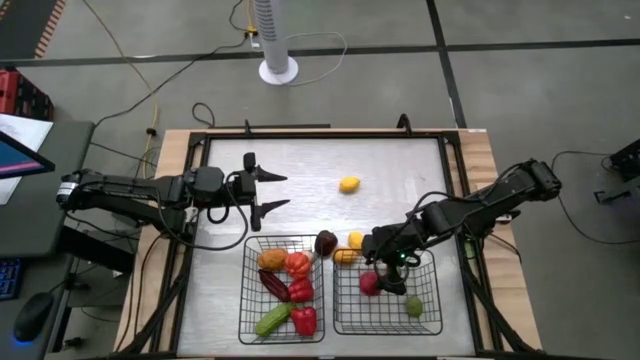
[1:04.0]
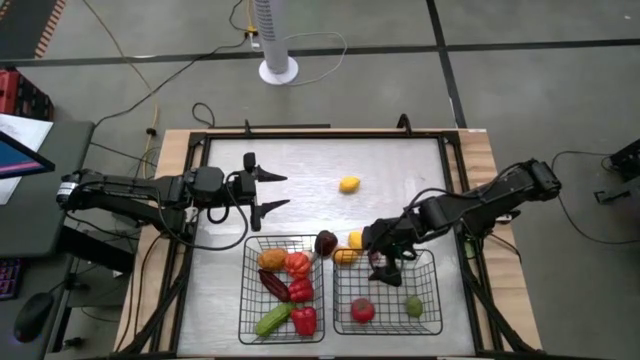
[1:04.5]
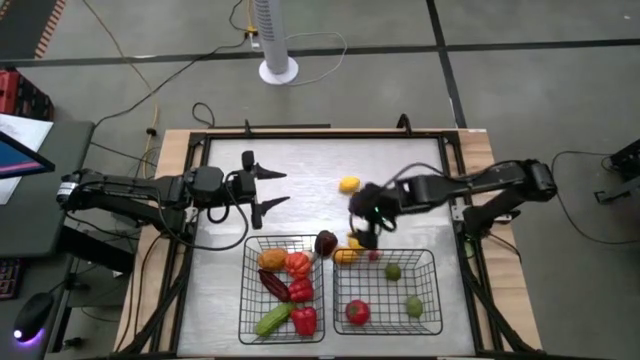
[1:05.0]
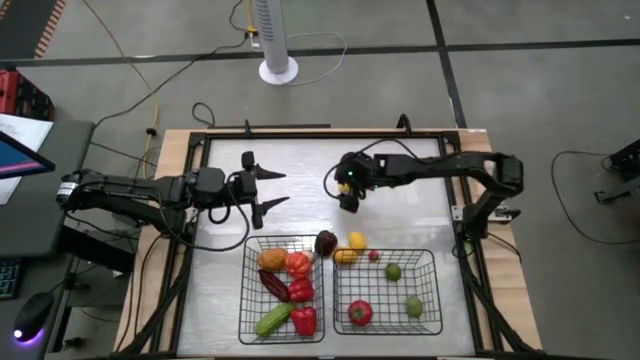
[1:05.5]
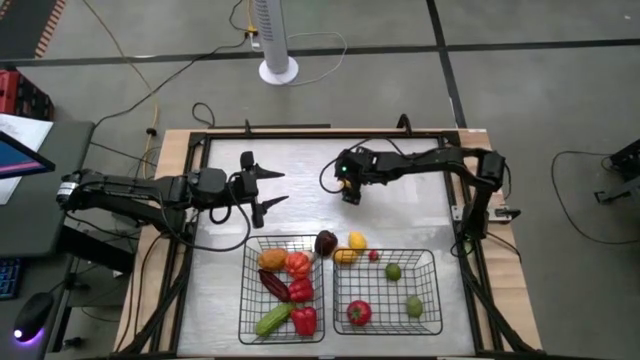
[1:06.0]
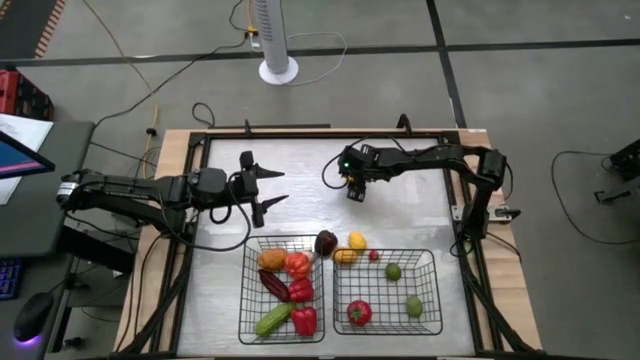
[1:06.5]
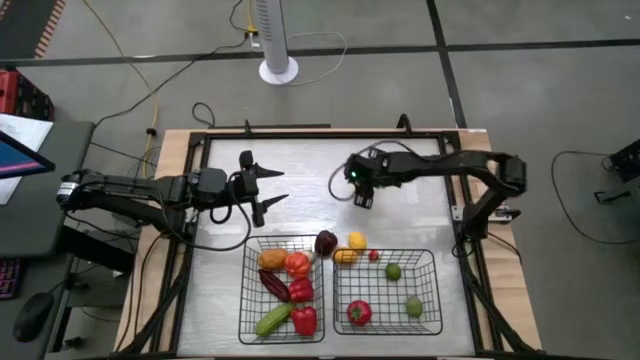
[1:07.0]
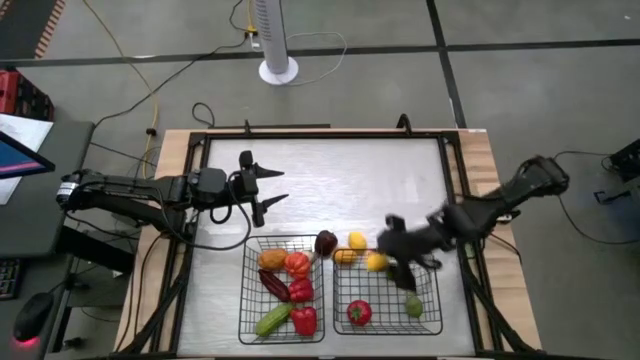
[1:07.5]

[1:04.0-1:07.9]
Task: Sort produce into baskets
Put the top yellow lemon into the right black wire basket

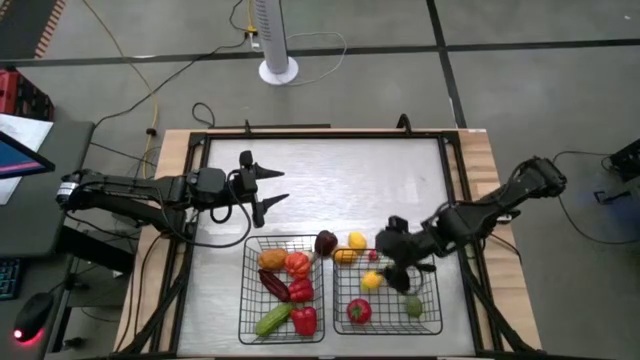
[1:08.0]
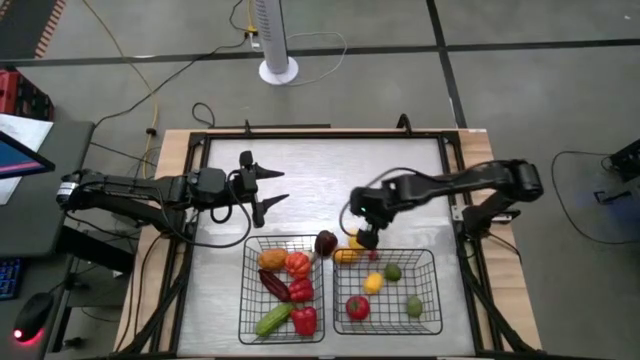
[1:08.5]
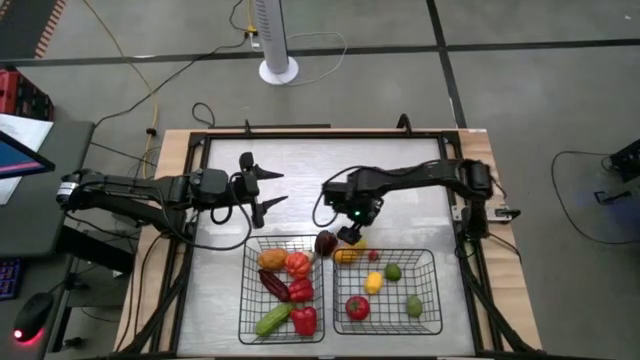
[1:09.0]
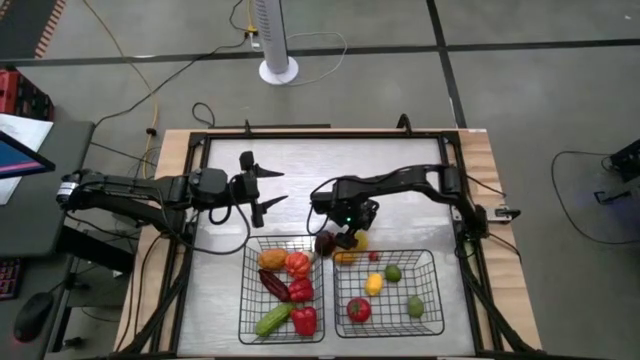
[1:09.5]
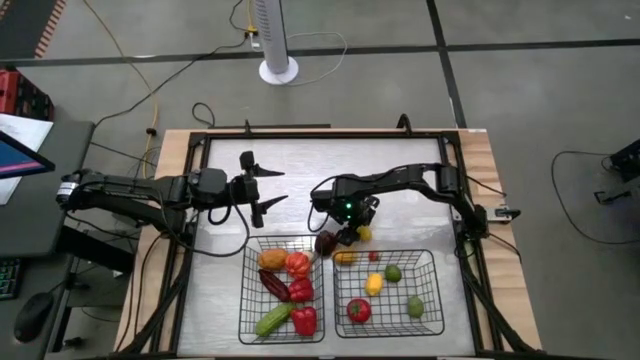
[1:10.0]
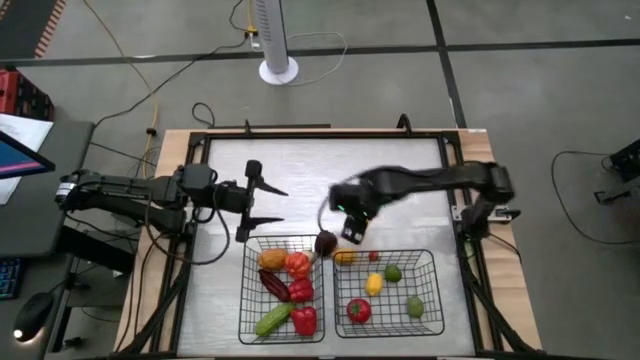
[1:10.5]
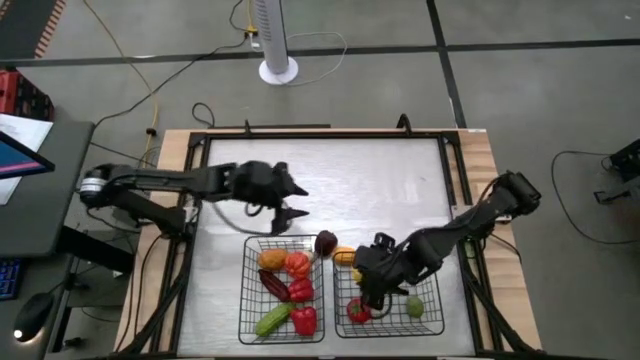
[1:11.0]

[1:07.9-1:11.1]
Put the top yellow lemon into the right black wire basket

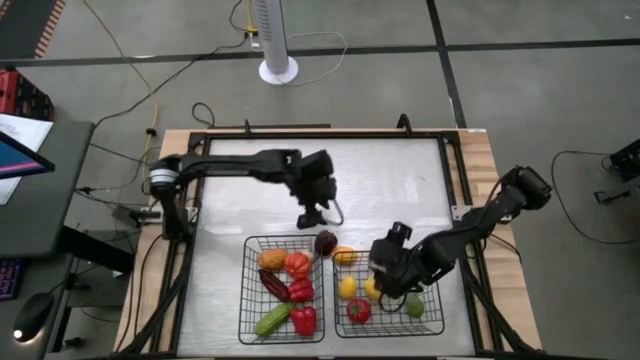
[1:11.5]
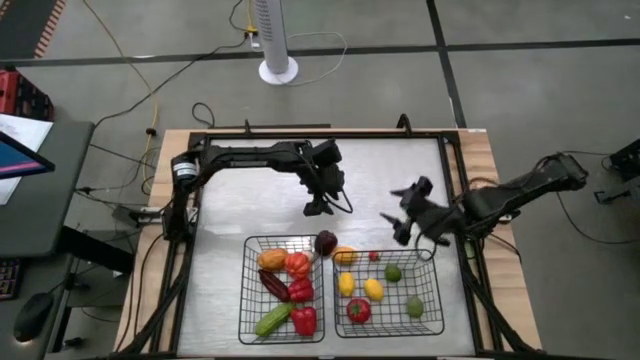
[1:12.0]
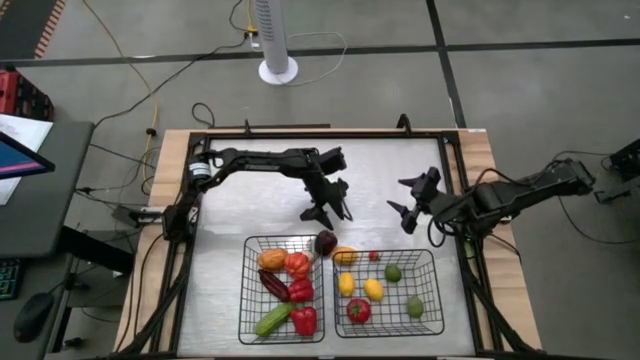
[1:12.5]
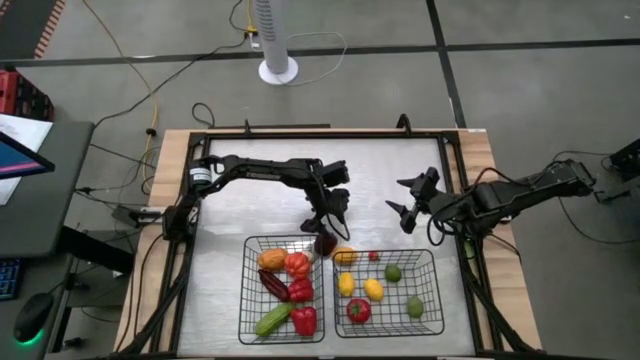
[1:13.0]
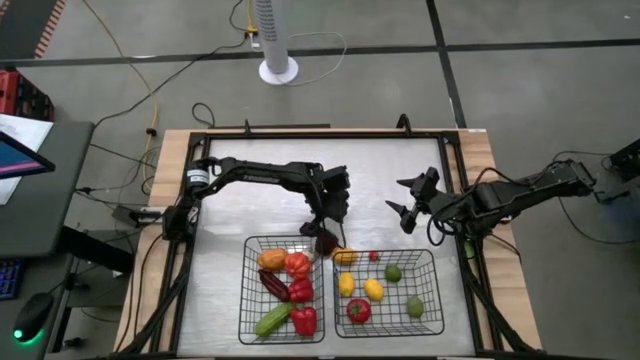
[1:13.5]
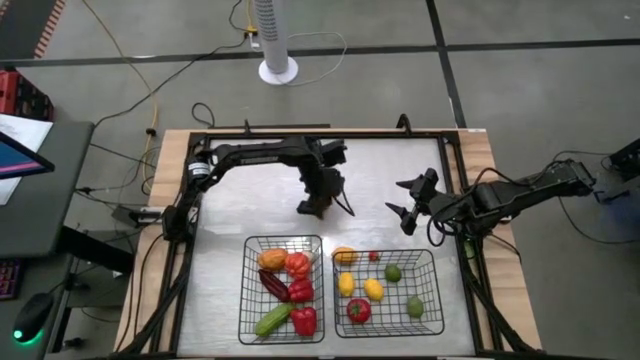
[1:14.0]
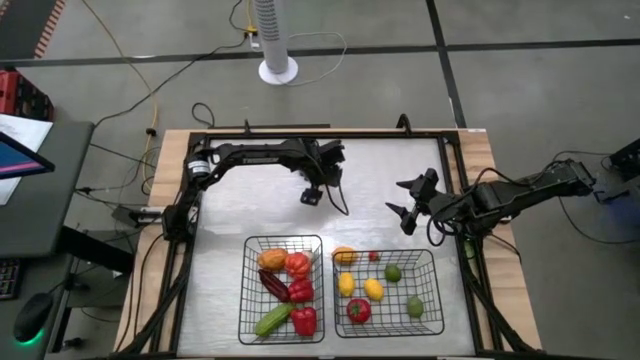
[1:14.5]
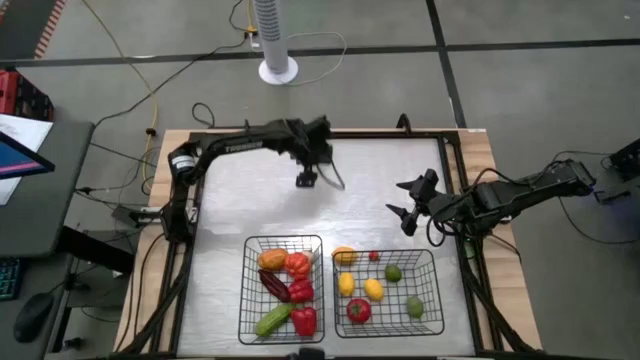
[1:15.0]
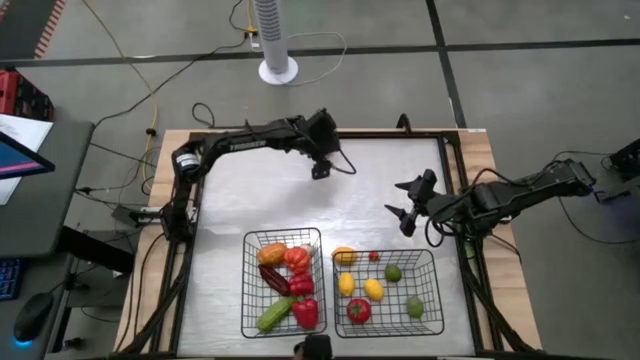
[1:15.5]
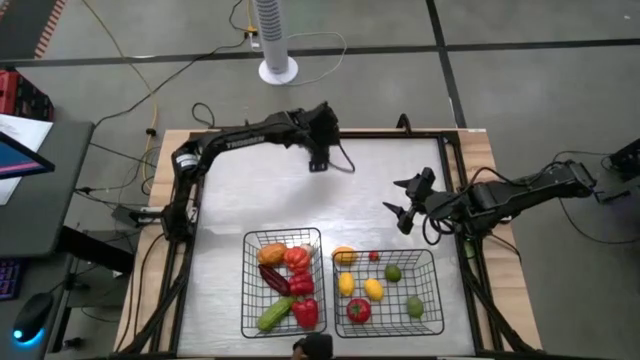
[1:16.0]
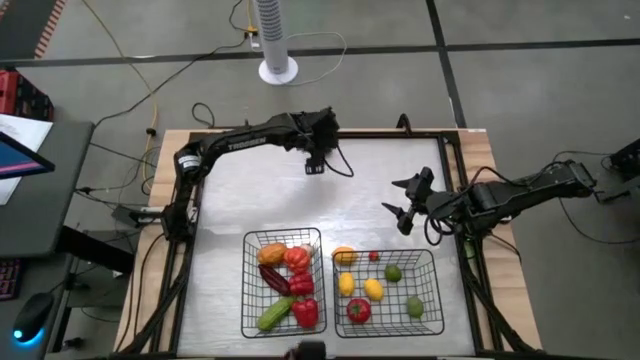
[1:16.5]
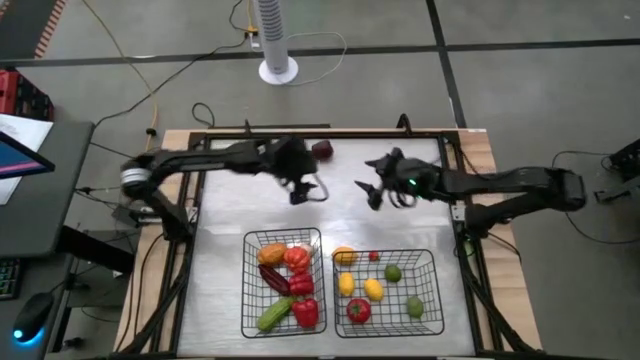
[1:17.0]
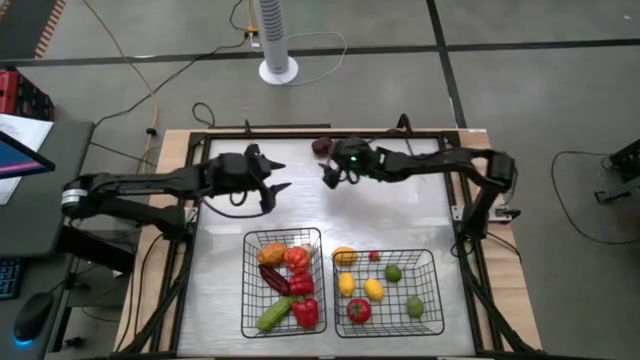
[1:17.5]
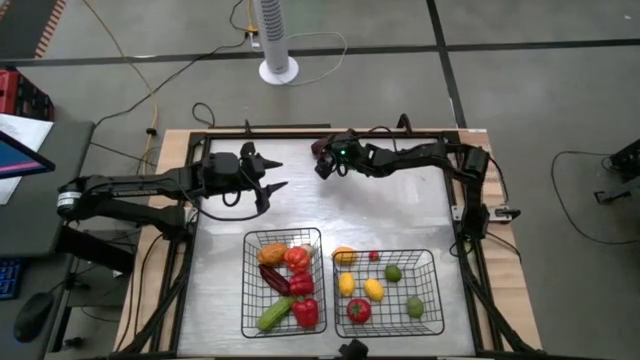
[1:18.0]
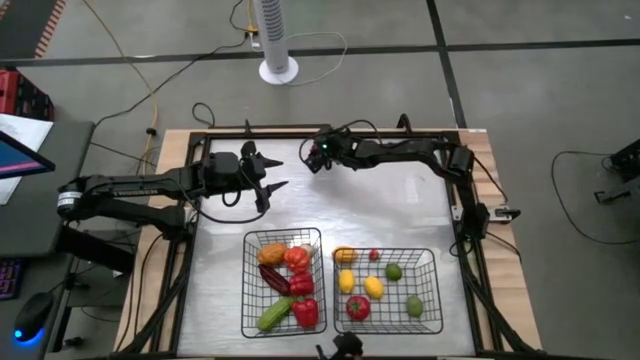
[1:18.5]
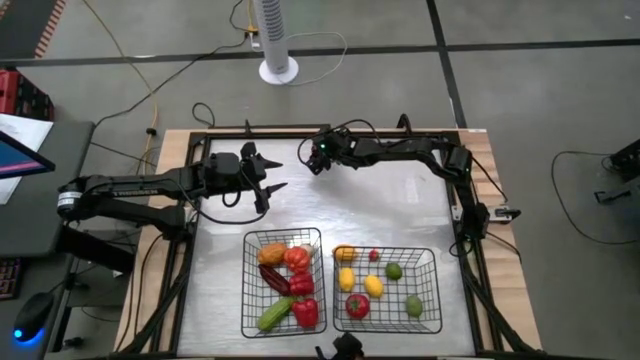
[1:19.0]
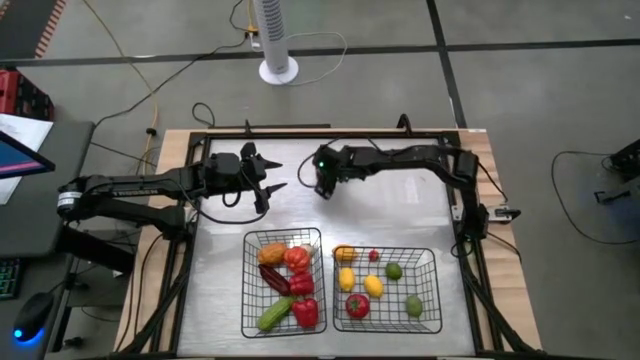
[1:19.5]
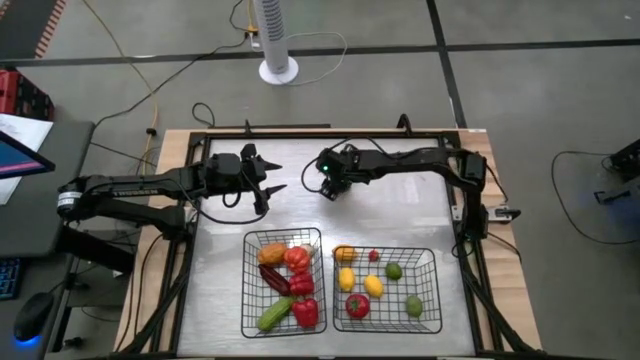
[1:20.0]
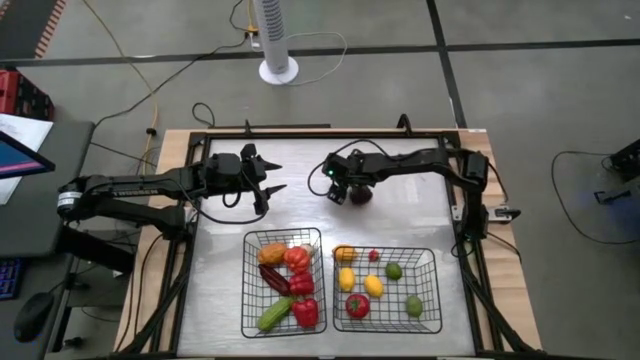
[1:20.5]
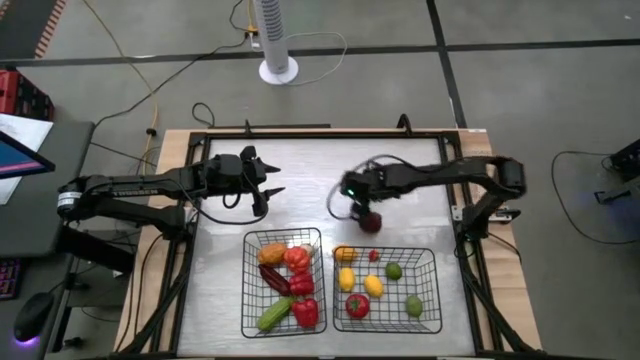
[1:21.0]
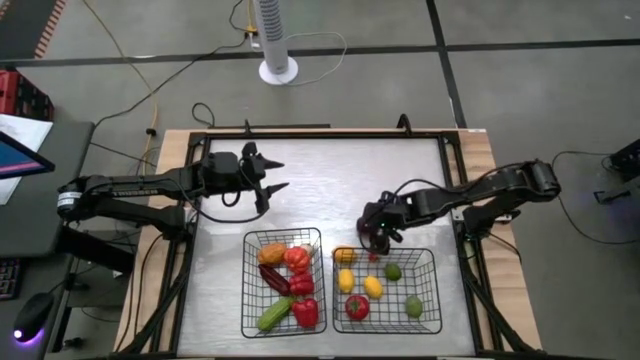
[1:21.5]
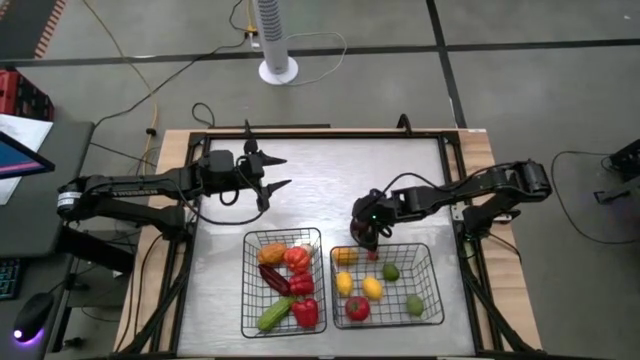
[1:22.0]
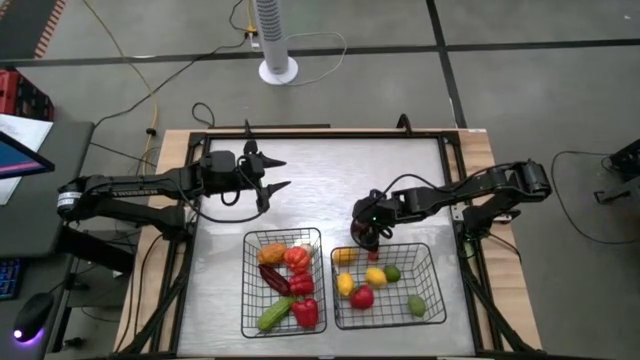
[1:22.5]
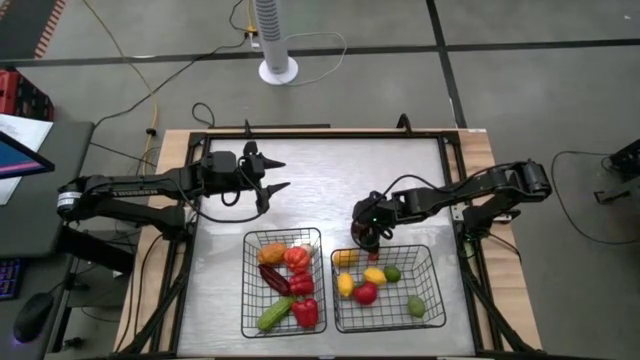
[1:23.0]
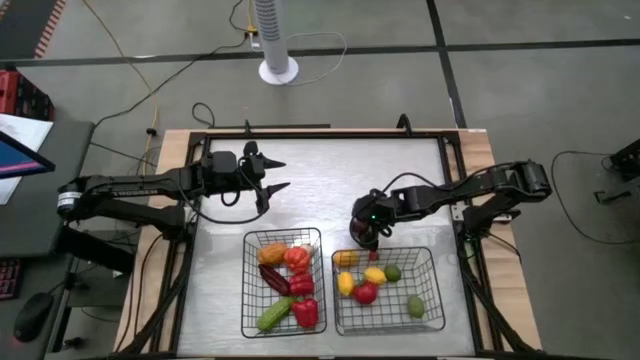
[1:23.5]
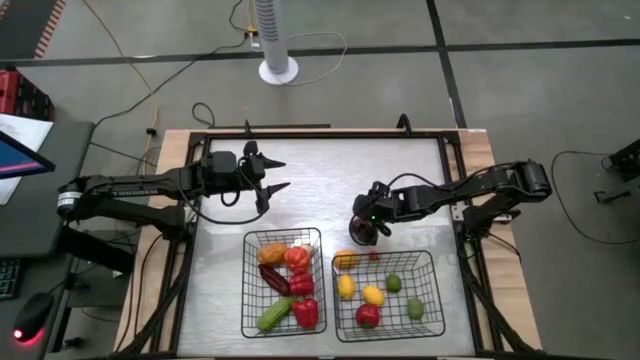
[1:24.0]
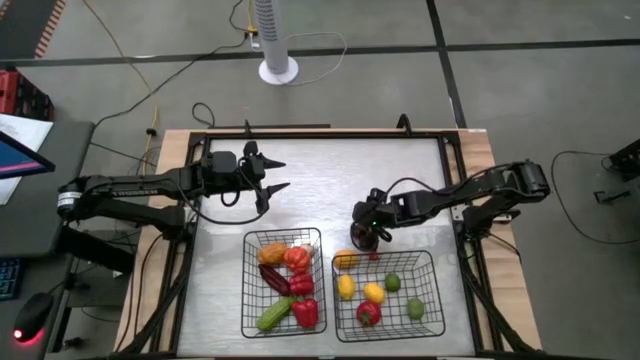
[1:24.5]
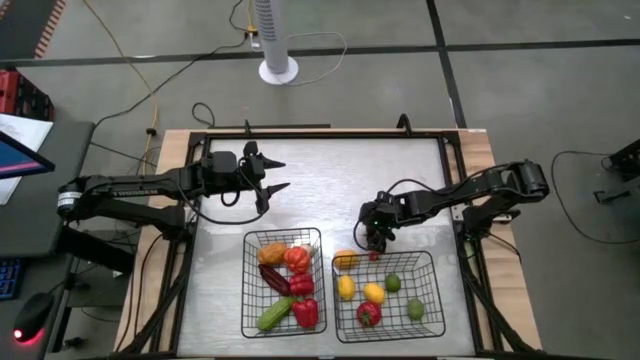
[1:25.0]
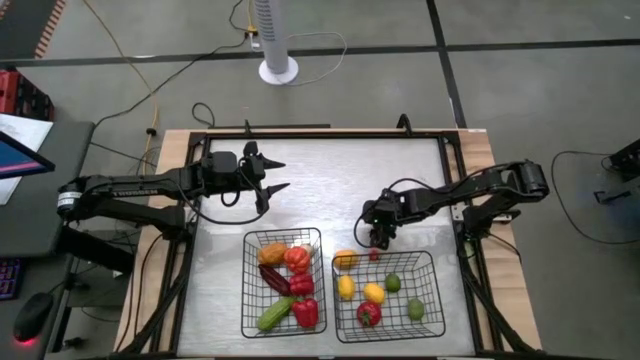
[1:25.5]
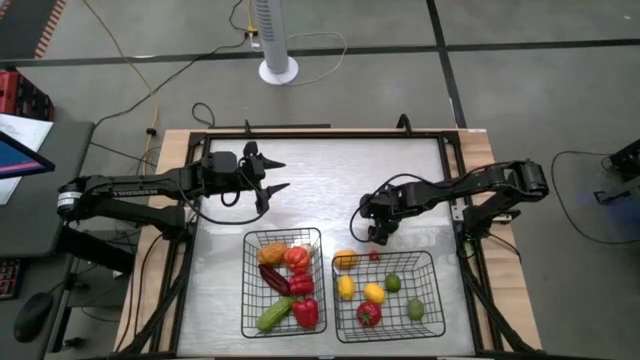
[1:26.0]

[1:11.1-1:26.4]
Put the red apple into the right black wire basket
